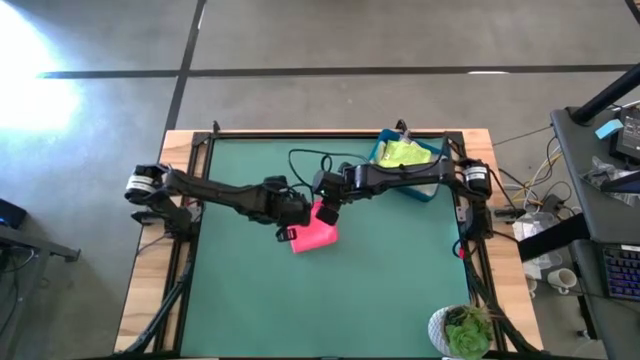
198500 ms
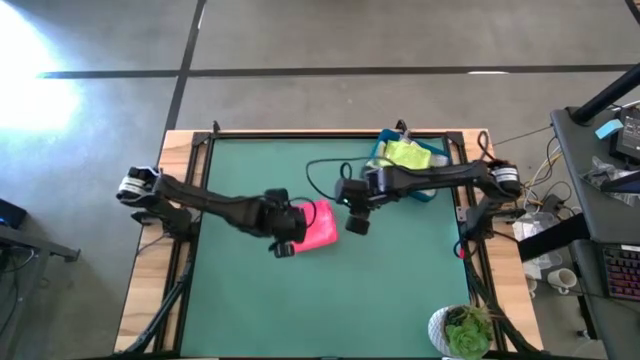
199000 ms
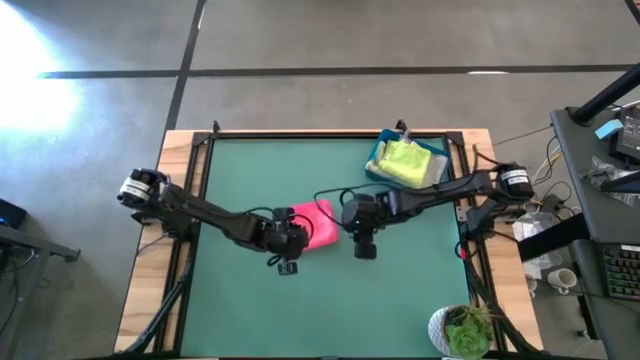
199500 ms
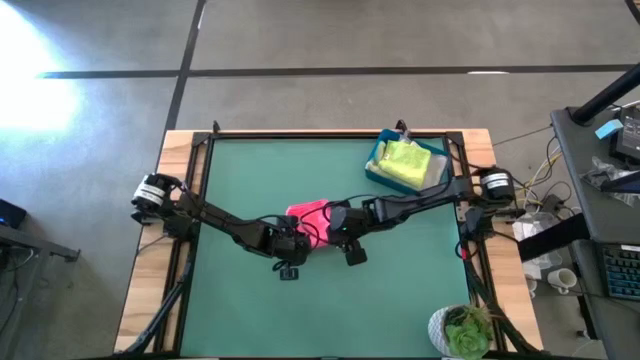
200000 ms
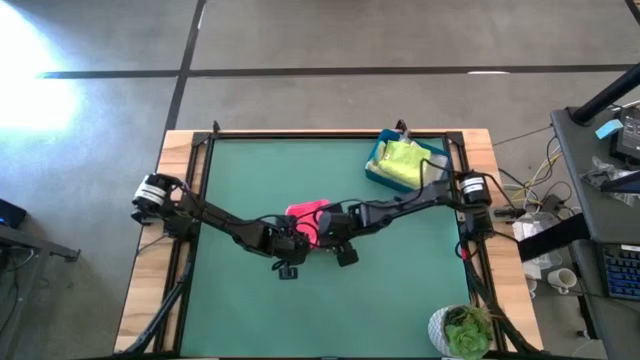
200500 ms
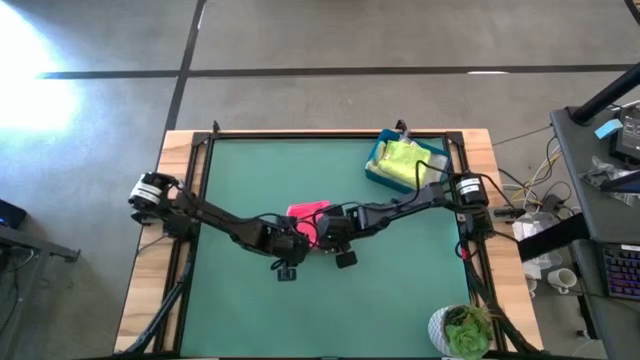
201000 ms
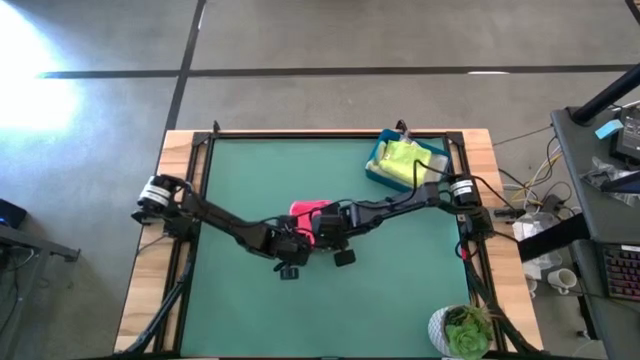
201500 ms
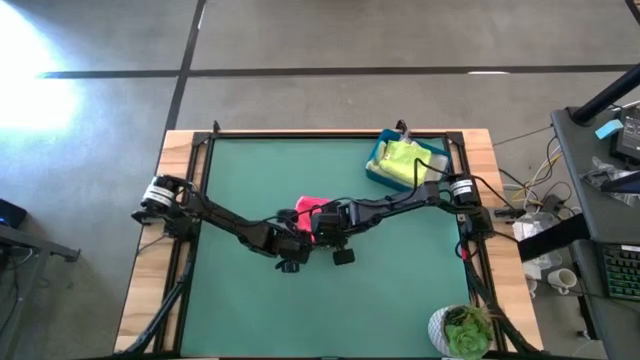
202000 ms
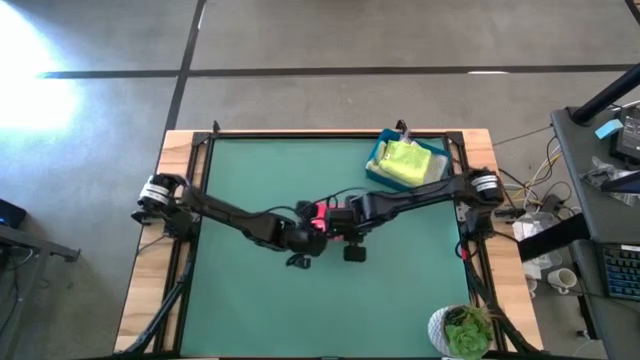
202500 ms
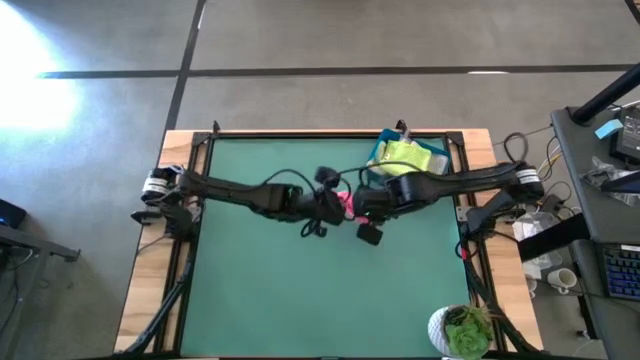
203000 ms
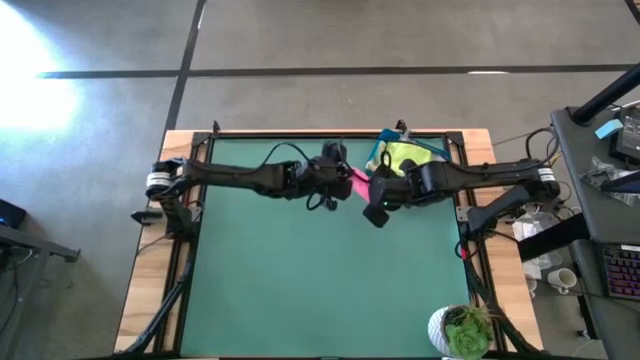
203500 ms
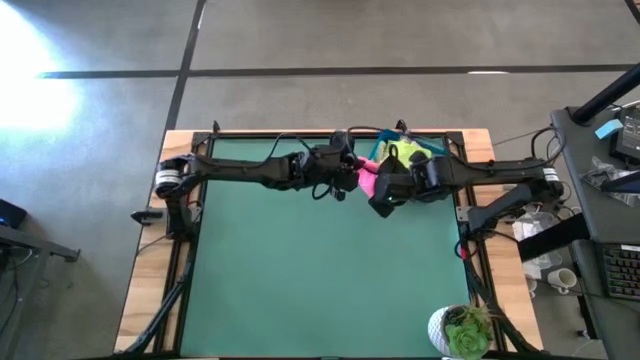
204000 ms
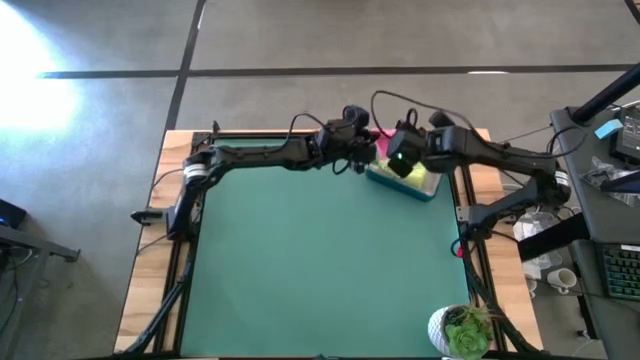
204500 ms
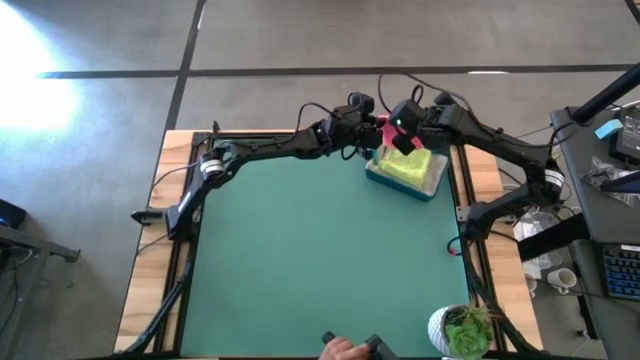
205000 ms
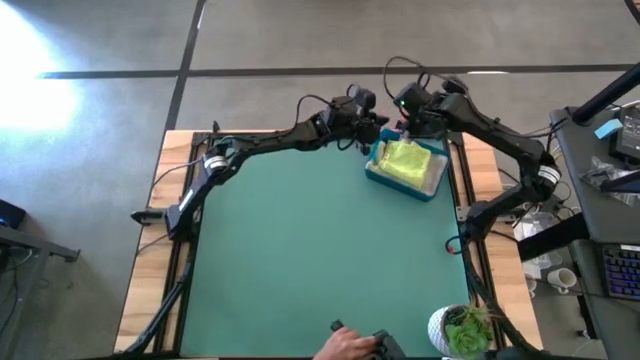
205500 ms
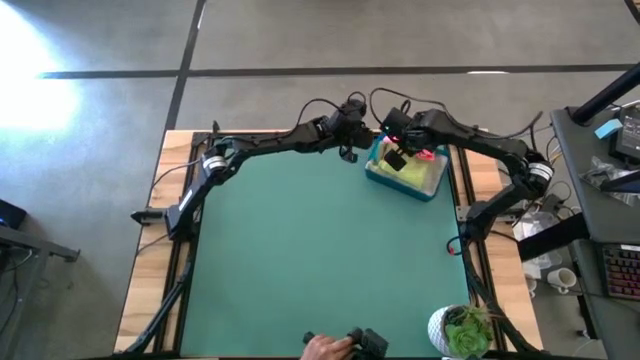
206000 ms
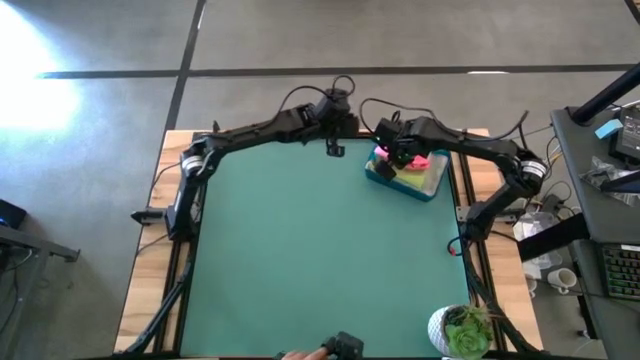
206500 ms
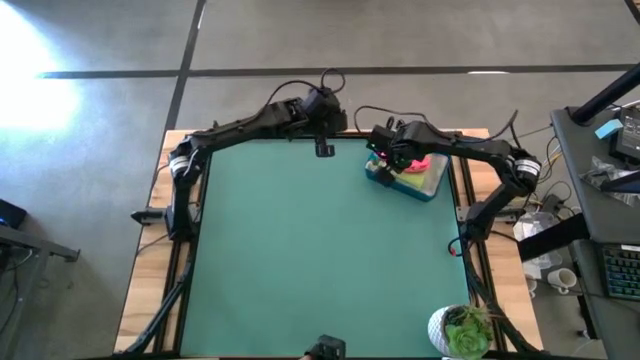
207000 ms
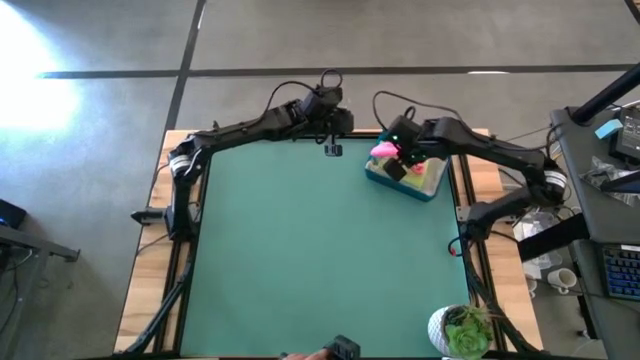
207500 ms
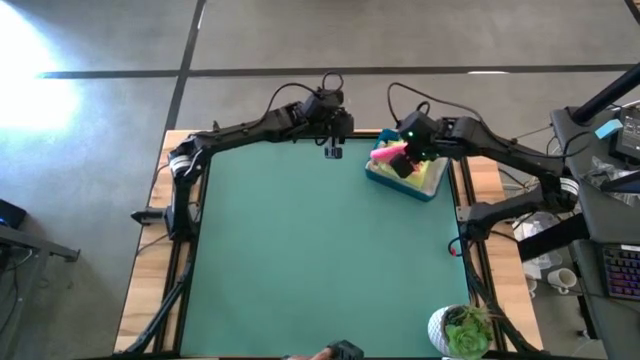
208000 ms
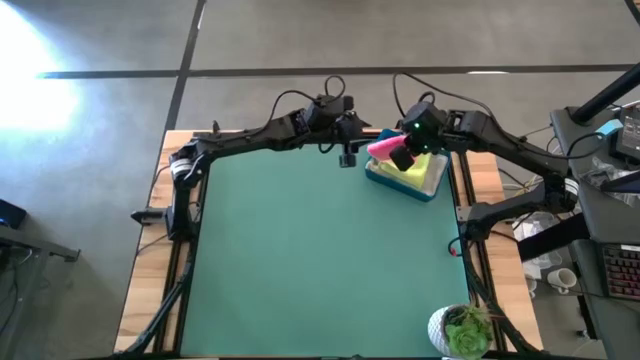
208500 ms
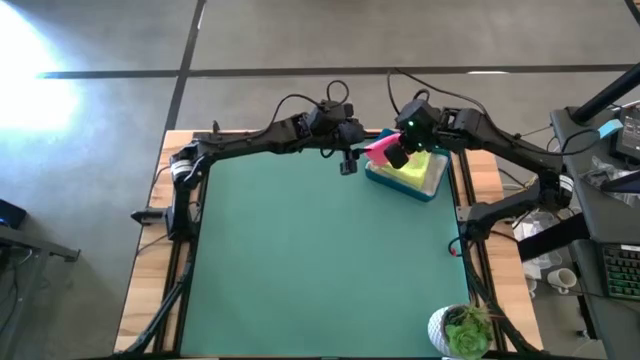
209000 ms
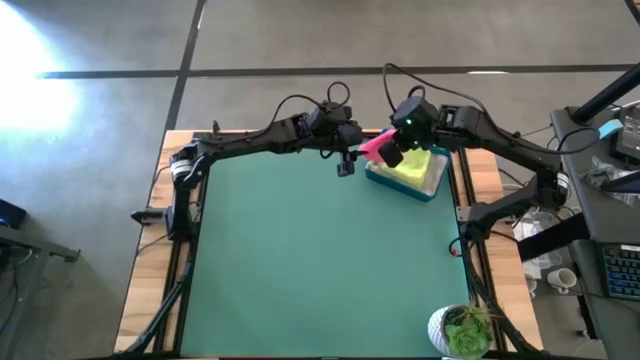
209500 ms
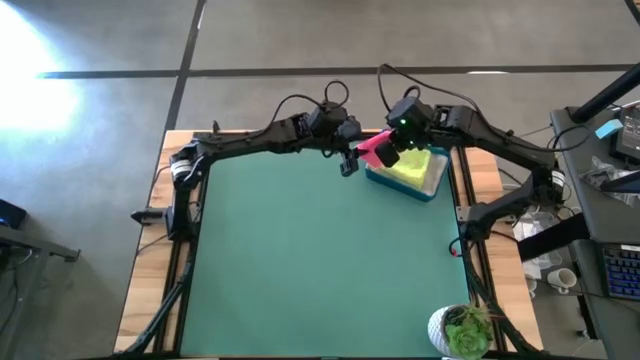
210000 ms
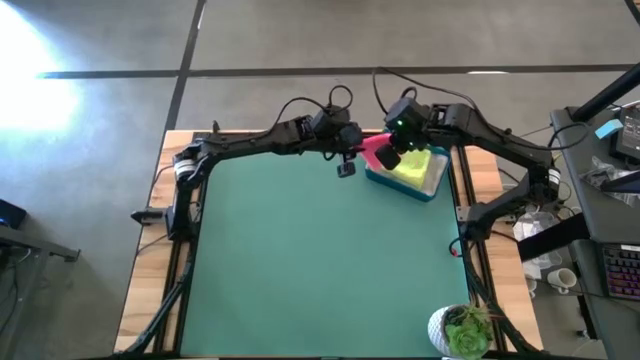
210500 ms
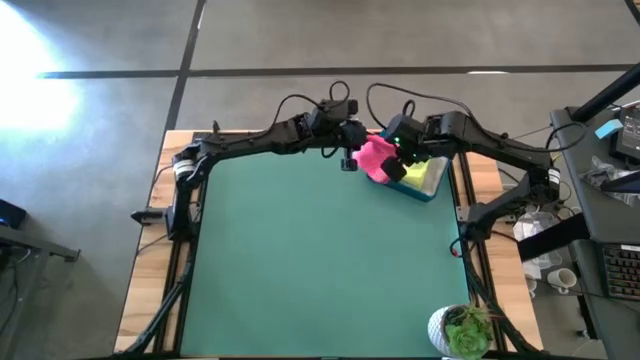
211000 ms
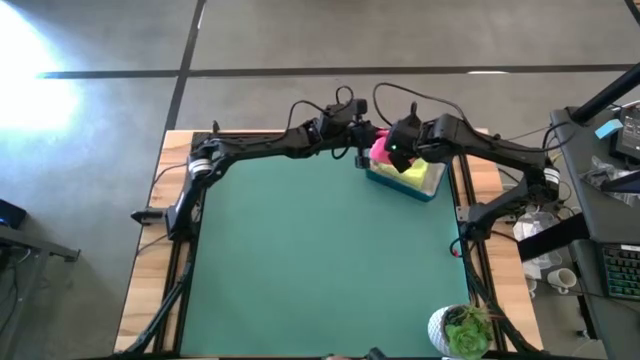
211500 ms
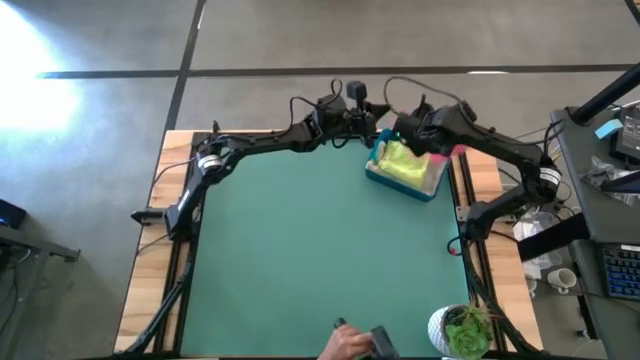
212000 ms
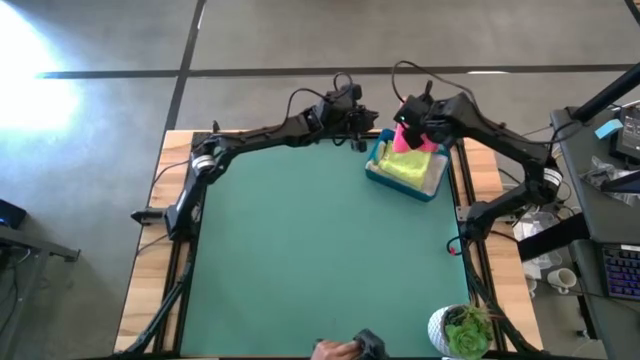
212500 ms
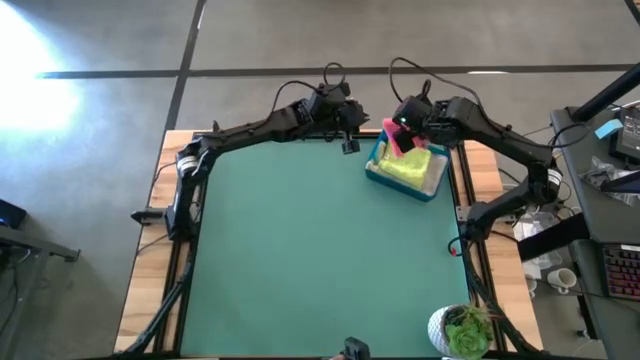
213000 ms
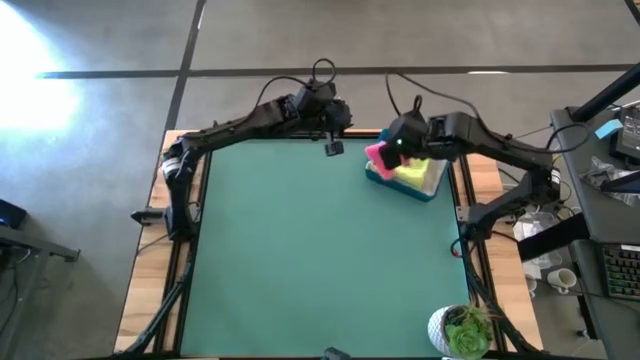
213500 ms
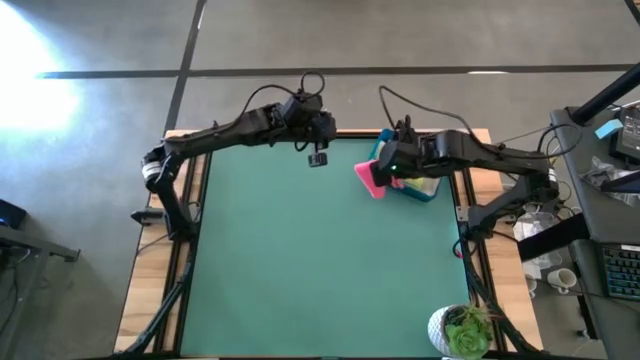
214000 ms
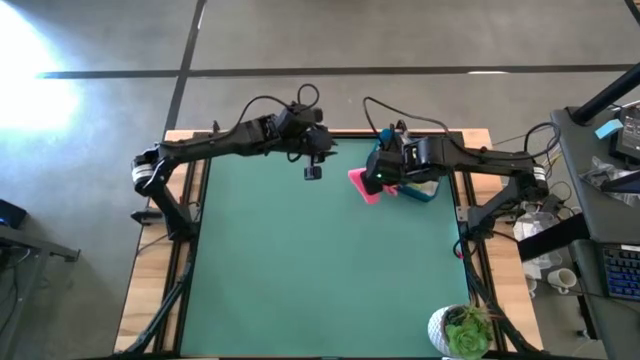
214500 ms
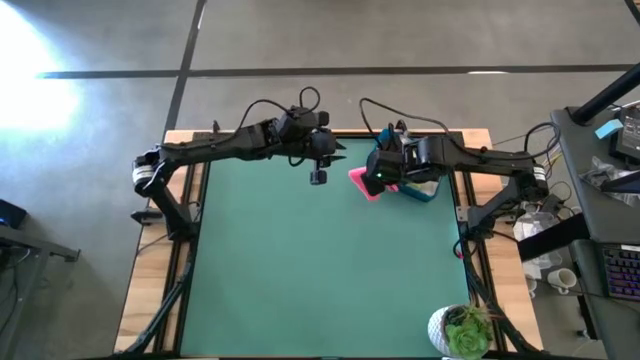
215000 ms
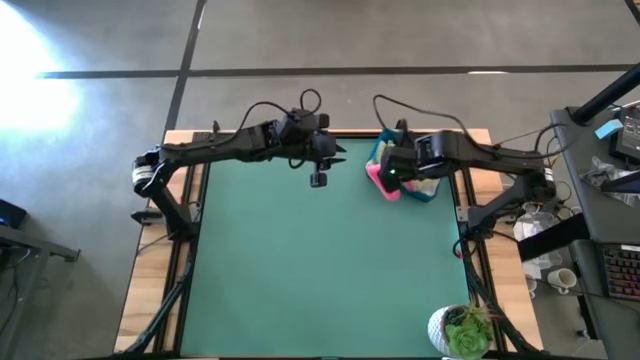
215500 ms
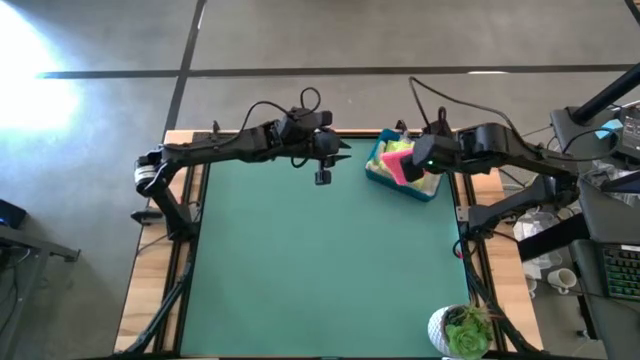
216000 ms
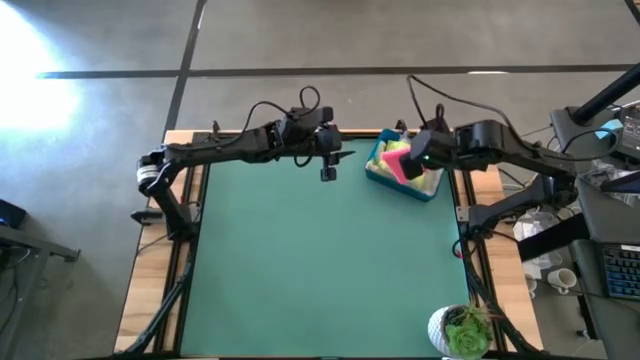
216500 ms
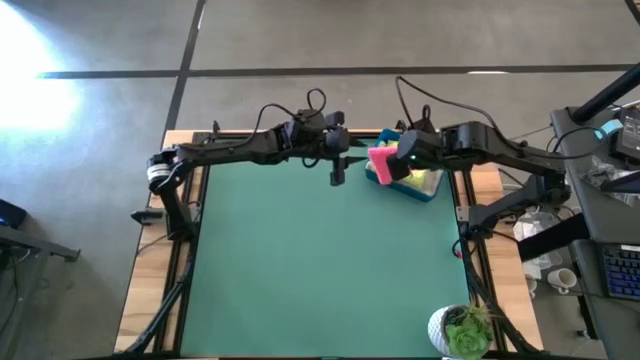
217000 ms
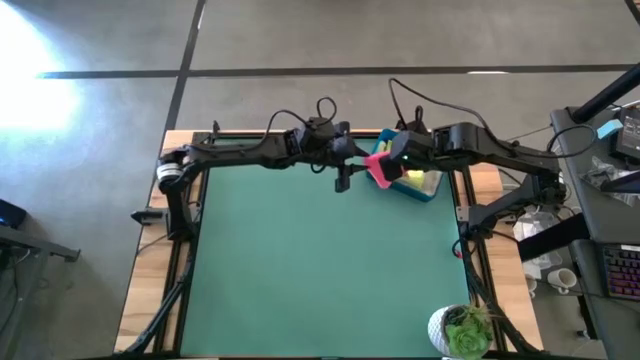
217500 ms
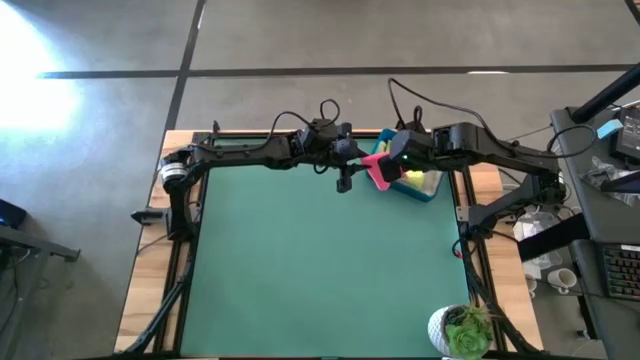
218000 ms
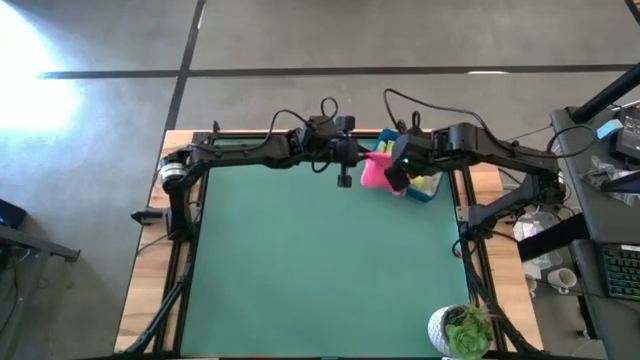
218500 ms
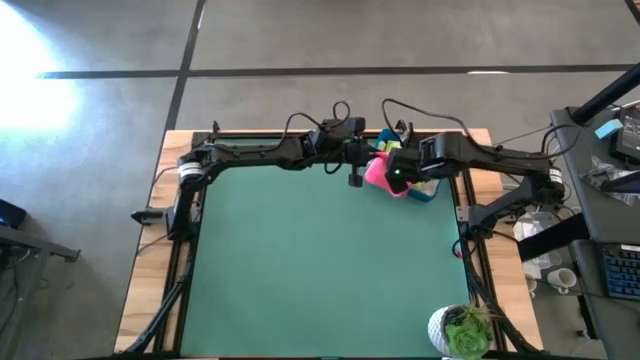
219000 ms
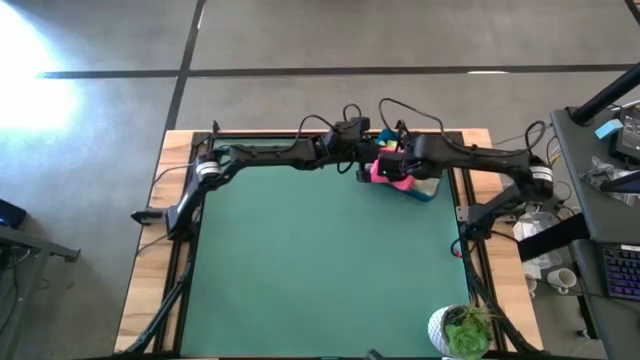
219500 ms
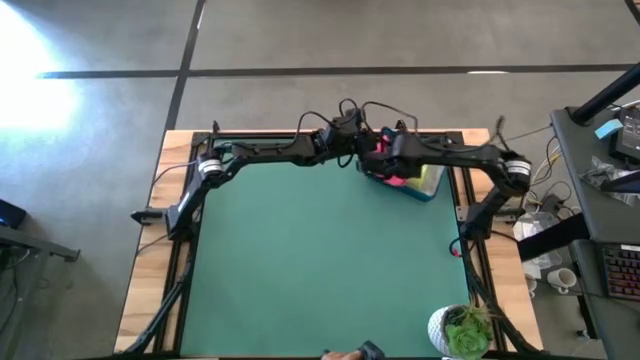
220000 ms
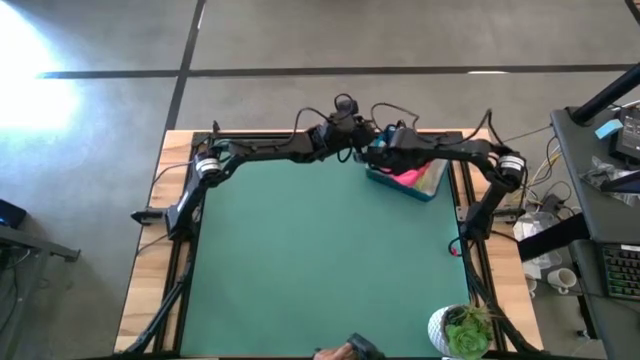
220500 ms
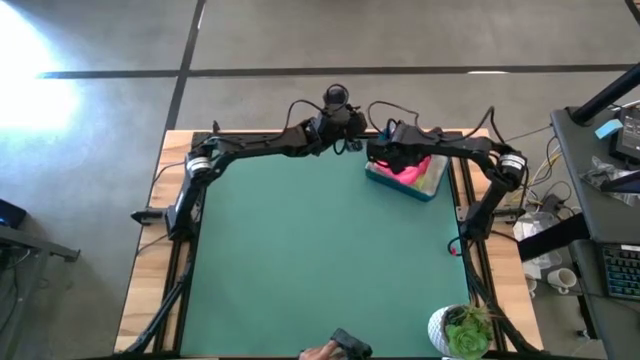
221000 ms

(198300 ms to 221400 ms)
Task: Fold microfiber towels
Put the folded pink microfiber cloth into the blue bin
